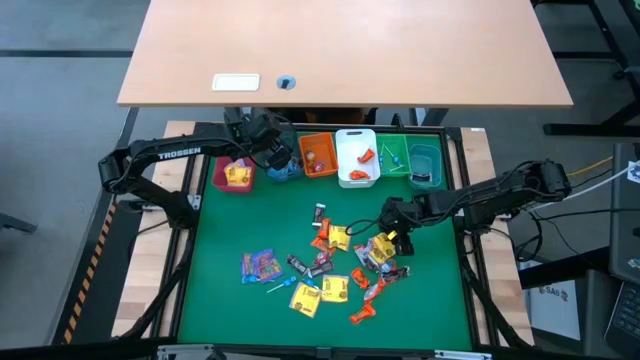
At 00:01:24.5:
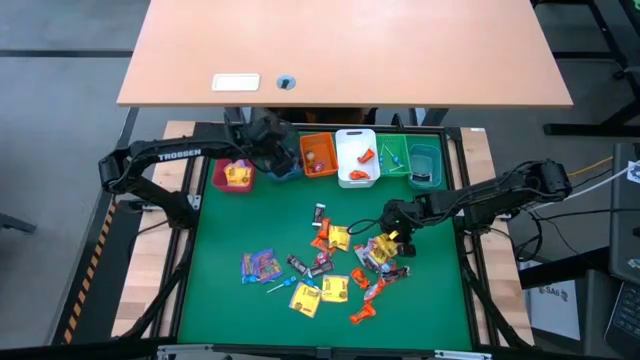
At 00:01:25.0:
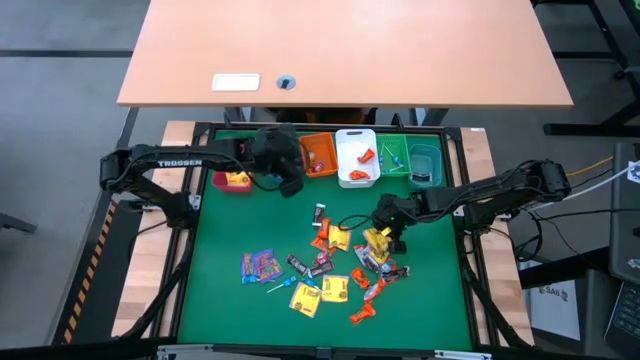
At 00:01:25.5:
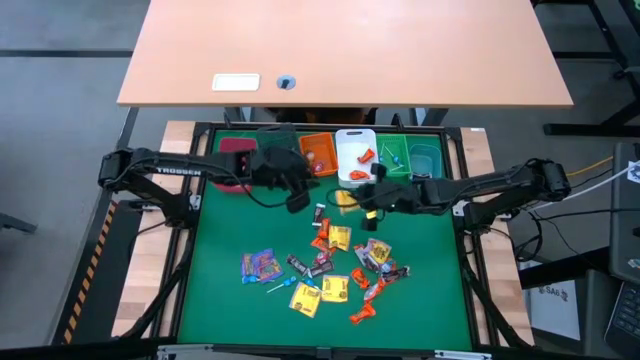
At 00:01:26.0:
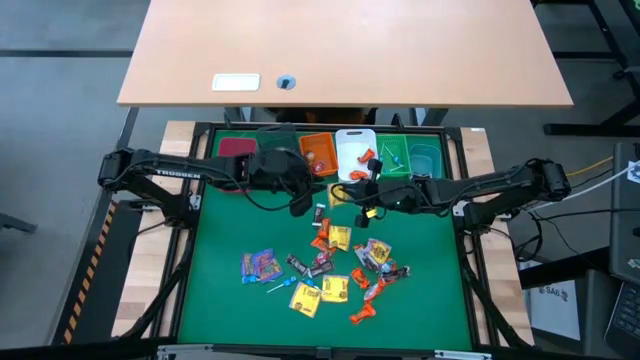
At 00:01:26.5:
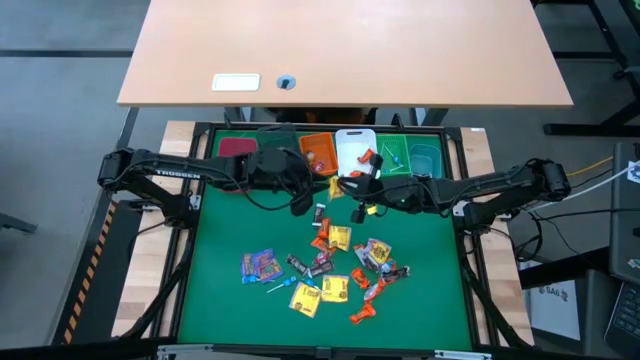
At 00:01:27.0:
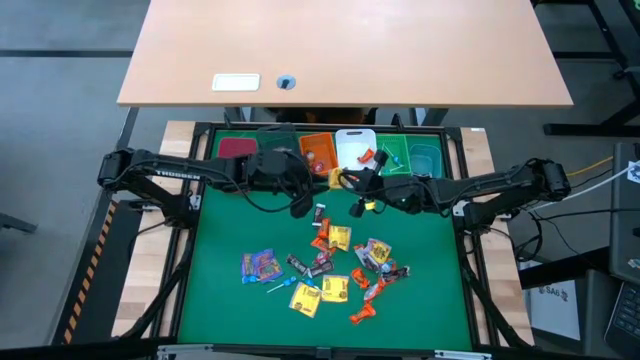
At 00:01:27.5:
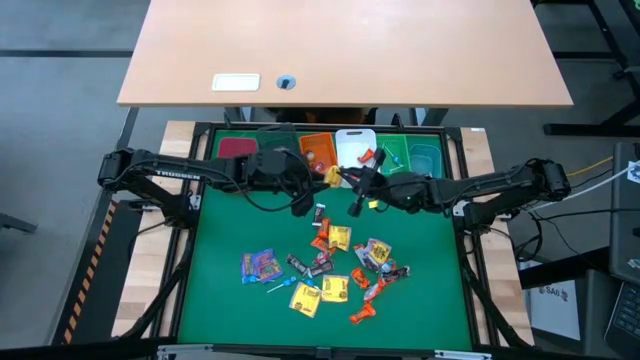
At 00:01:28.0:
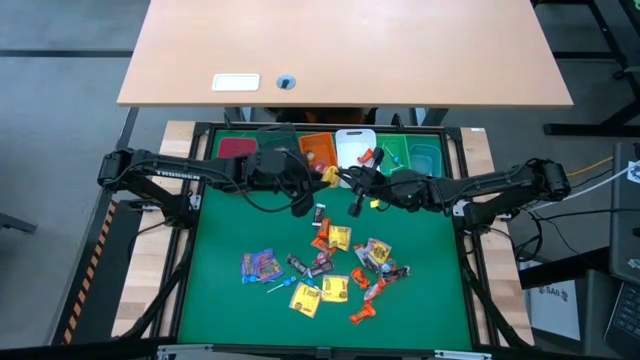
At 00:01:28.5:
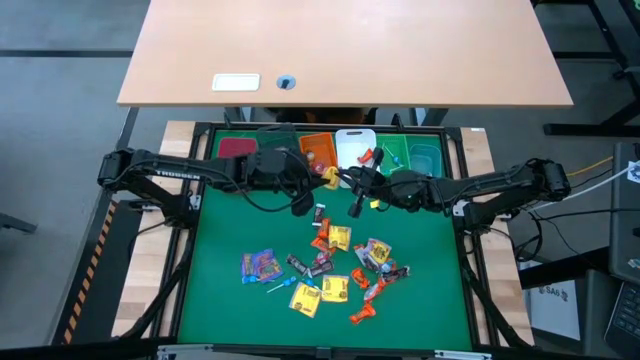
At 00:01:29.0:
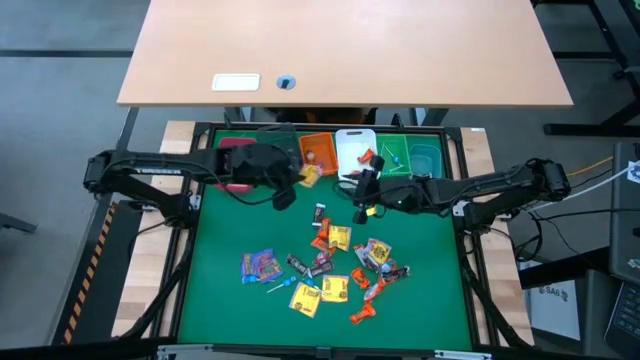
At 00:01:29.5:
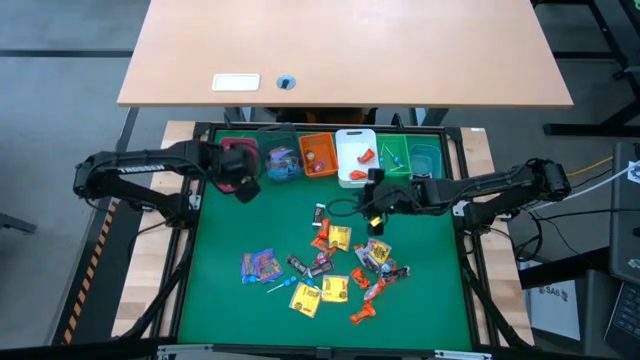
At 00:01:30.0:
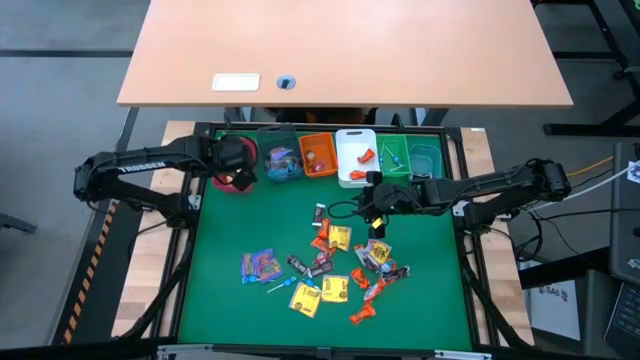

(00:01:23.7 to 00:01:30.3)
Task: Sort candy
Put the yellow candy into the red bin

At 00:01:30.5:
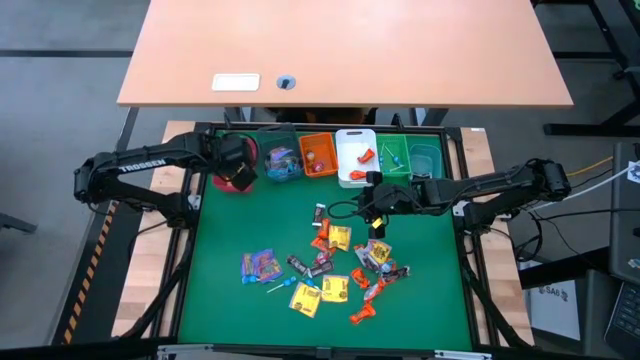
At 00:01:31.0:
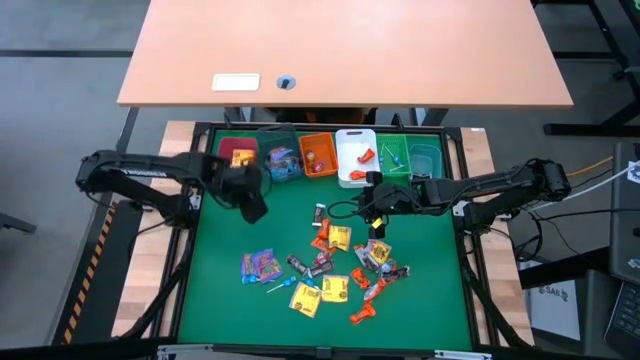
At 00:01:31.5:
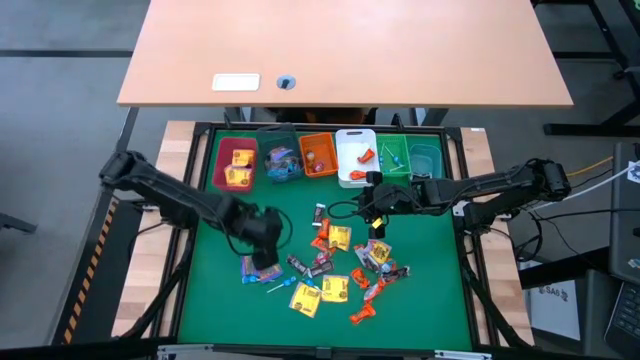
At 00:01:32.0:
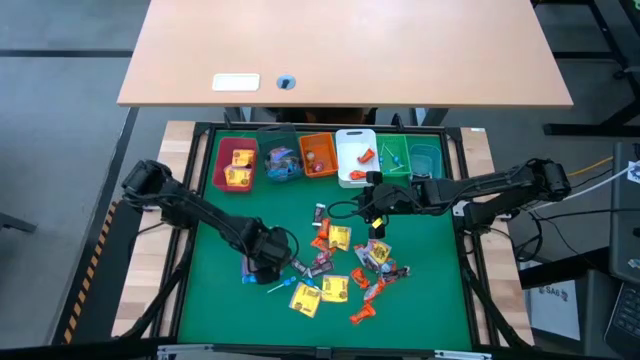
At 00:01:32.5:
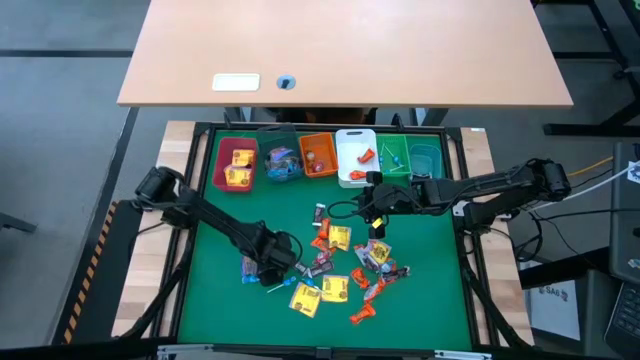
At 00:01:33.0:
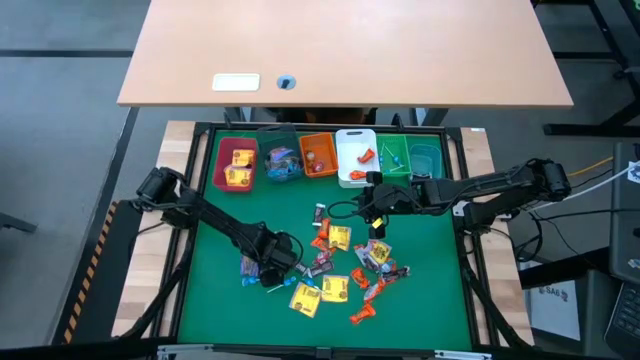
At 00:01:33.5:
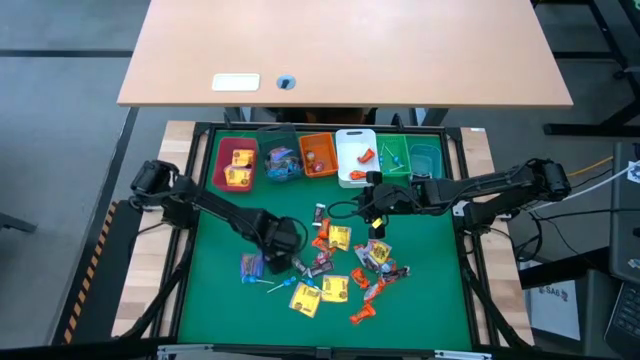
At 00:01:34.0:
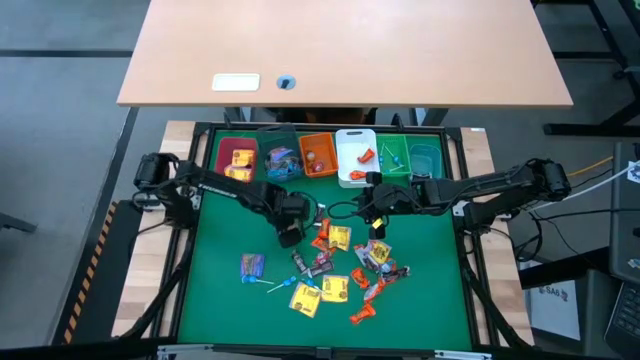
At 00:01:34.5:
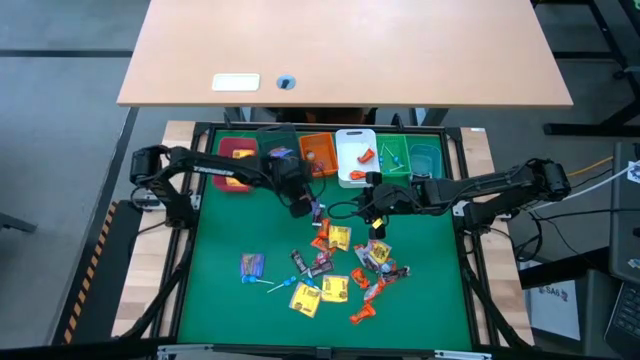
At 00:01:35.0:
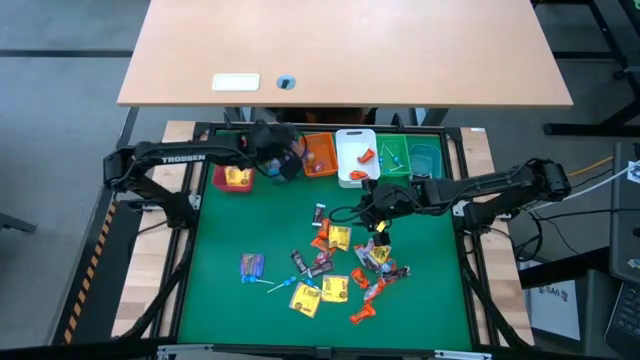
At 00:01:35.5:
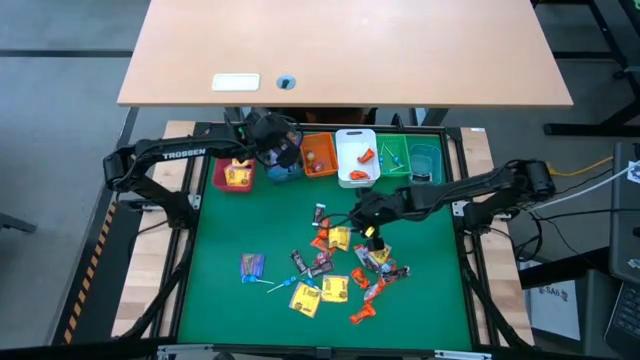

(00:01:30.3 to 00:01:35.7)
Put the purple candy into the black bin

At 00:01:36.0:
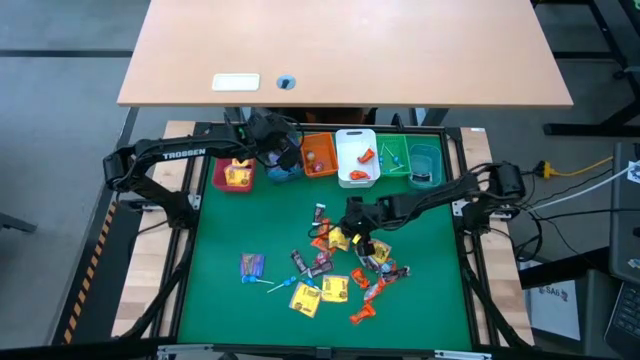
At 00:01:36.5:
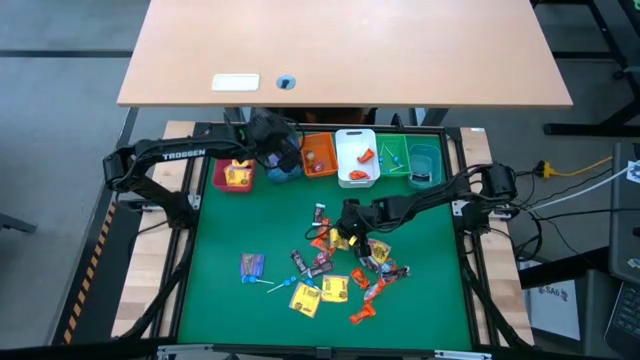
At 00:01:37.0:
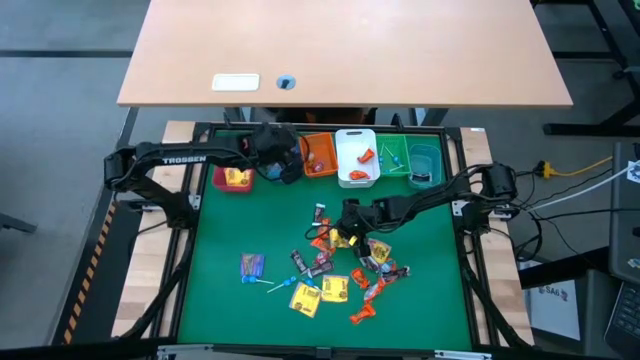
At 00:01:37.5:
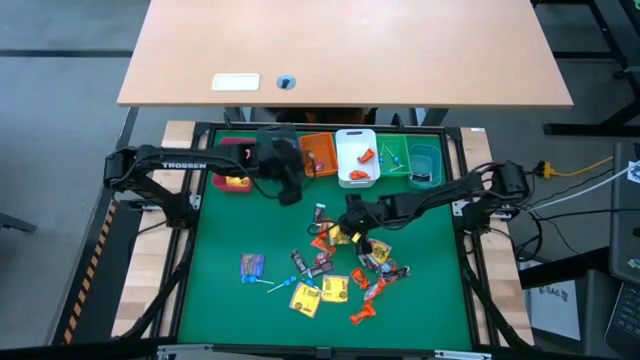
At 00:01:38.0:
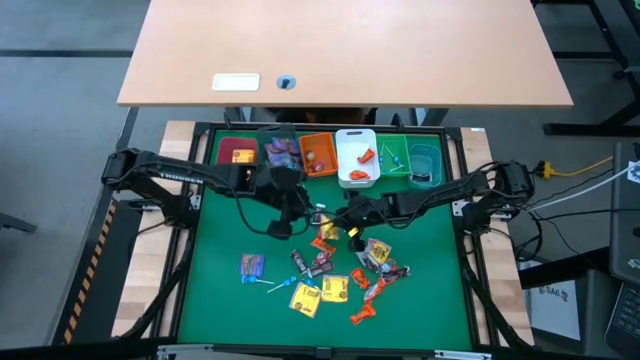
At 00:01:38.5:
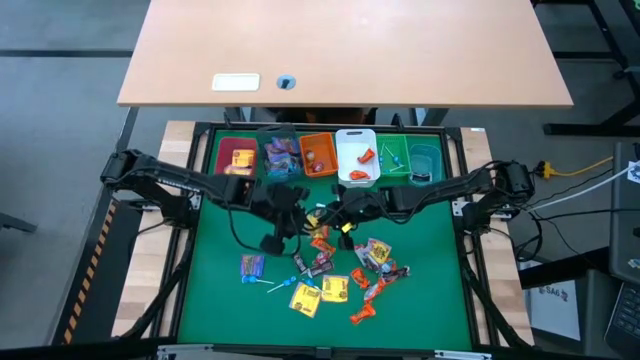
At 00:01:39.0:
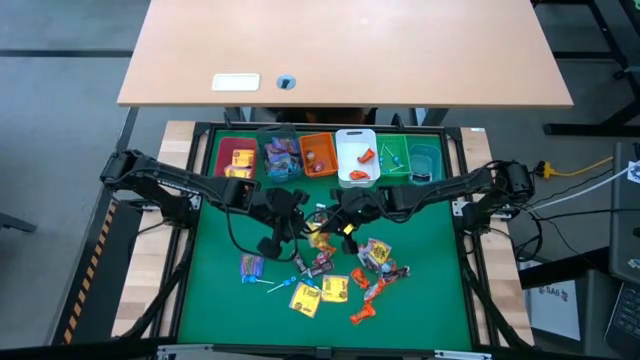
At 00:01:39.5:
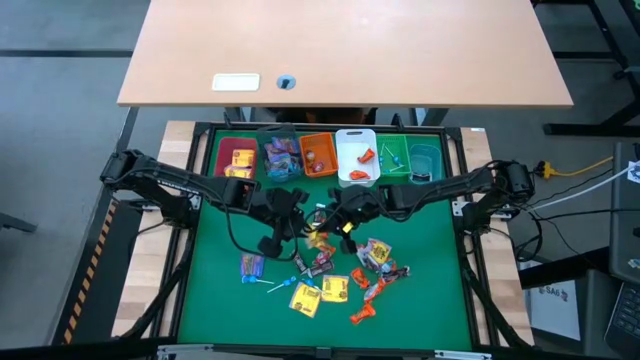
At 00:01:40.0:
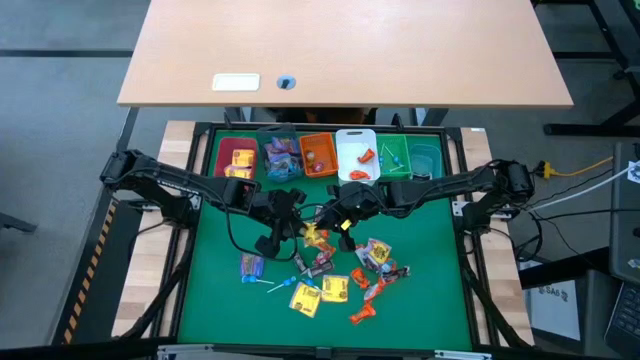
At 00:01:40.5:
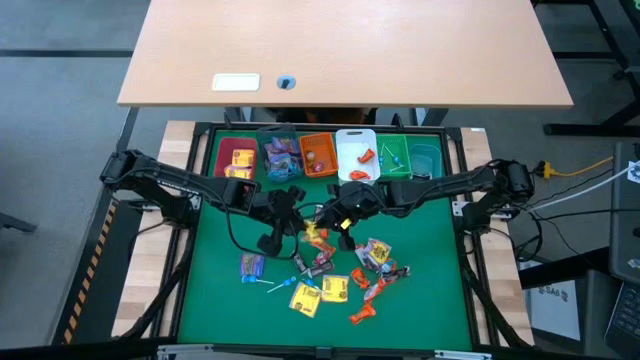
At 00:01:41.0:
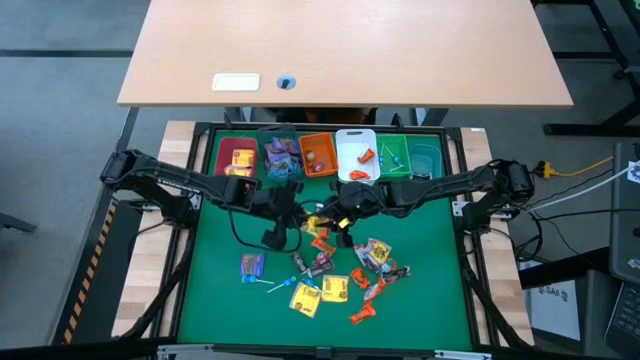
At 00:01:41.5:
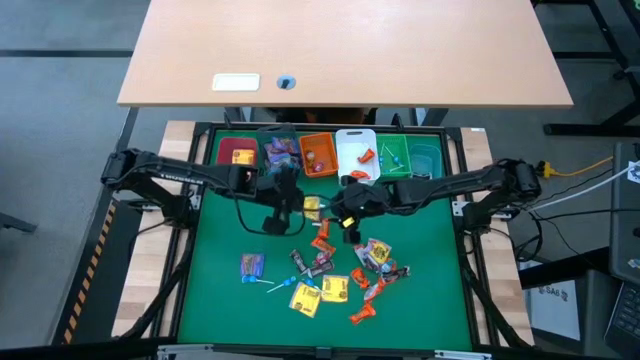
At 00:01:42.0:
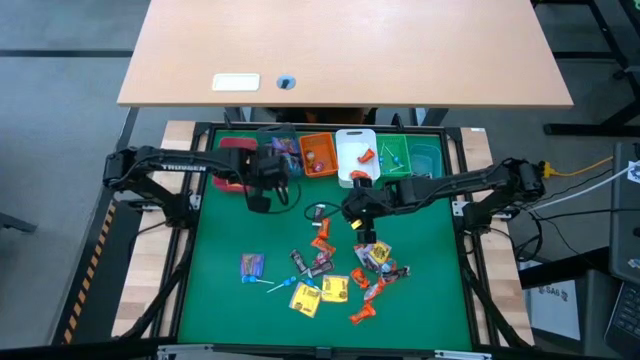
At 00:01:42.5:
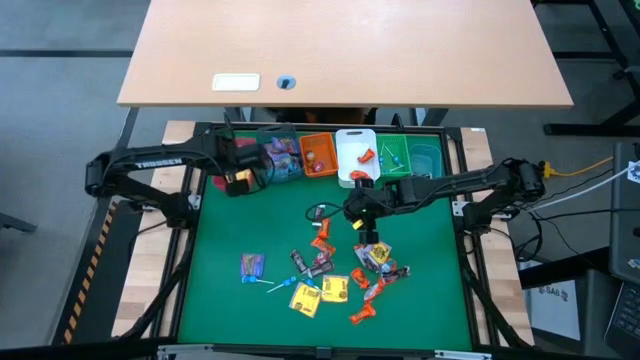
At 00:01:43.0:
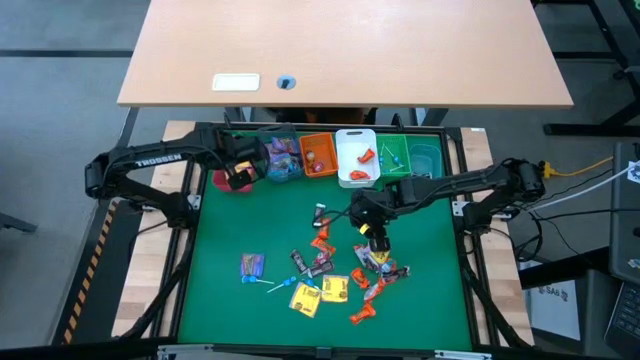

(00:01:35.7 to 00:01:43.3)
Put the yellow candy into the red bin
